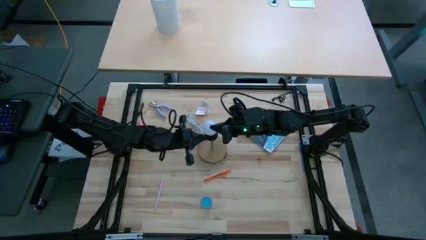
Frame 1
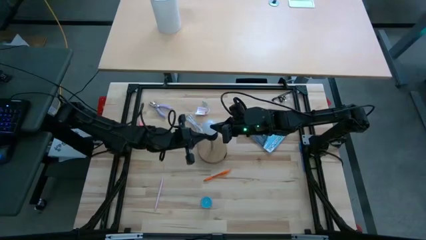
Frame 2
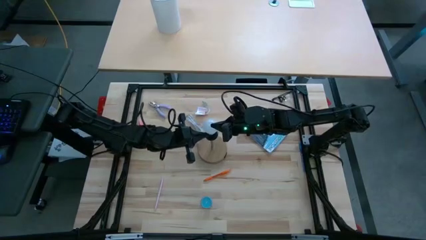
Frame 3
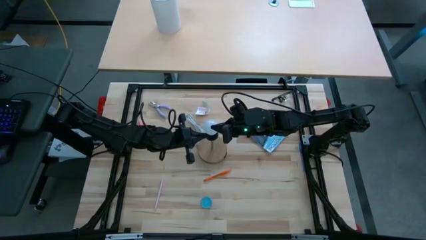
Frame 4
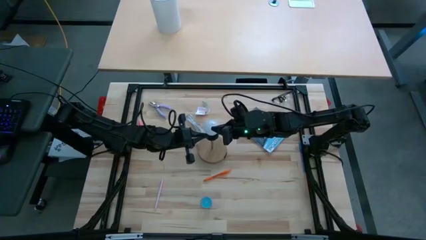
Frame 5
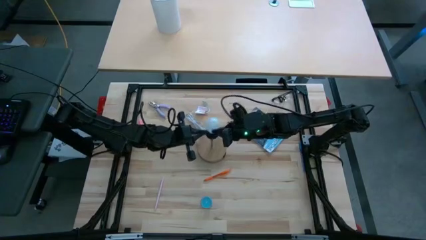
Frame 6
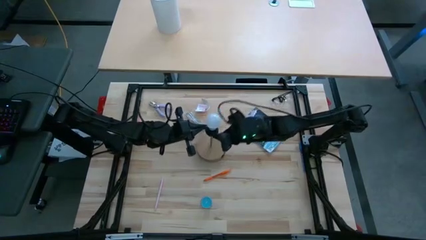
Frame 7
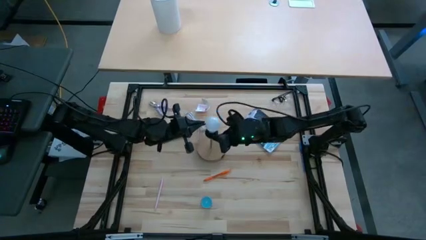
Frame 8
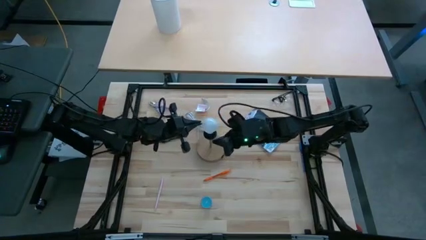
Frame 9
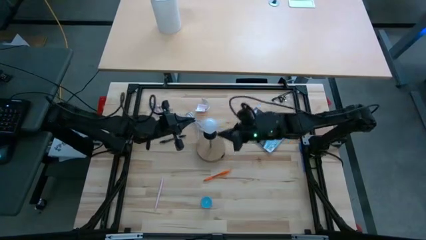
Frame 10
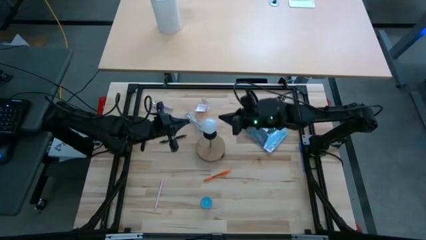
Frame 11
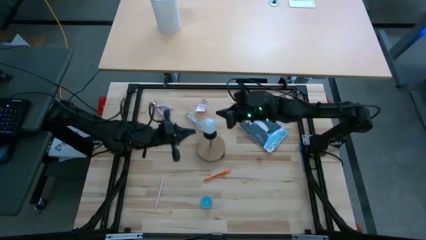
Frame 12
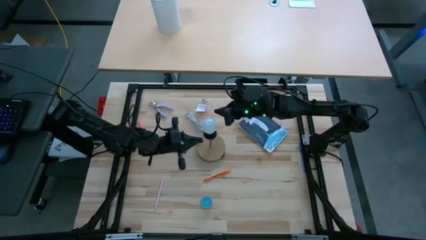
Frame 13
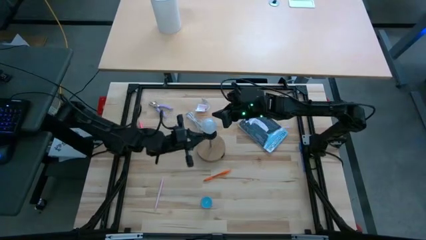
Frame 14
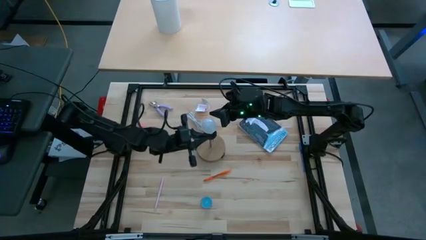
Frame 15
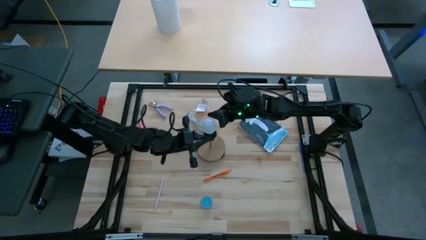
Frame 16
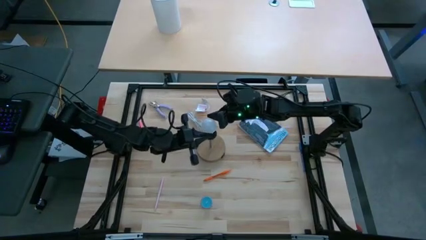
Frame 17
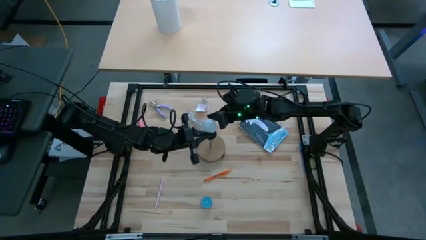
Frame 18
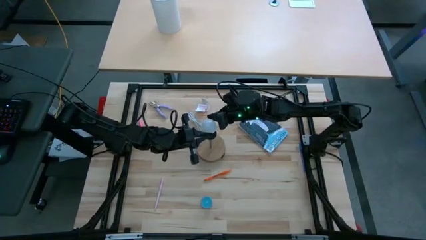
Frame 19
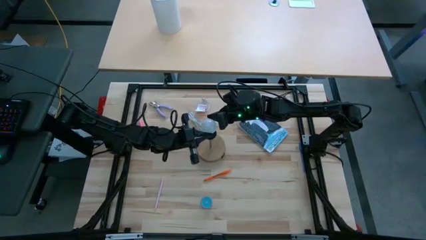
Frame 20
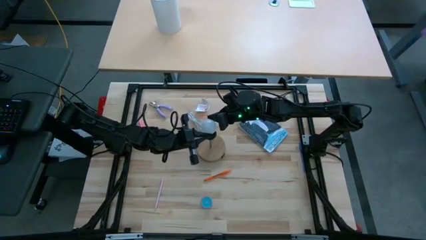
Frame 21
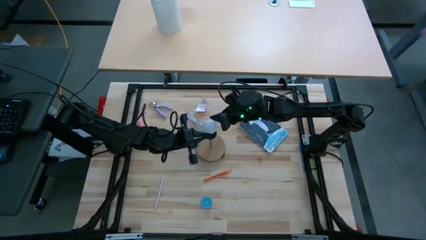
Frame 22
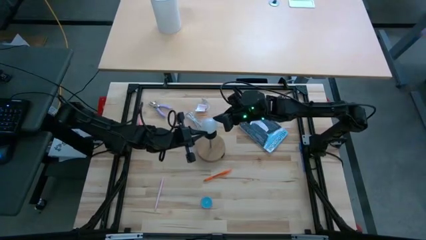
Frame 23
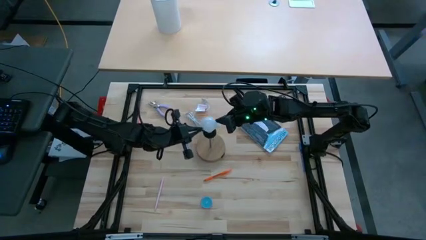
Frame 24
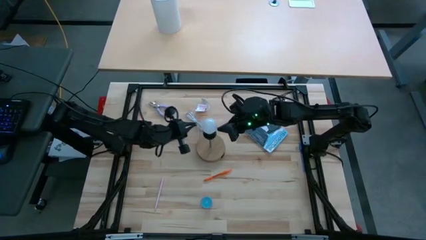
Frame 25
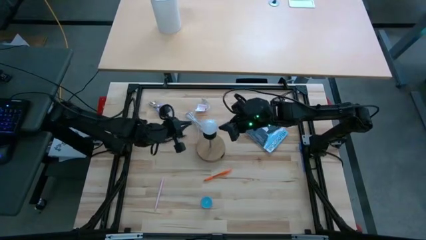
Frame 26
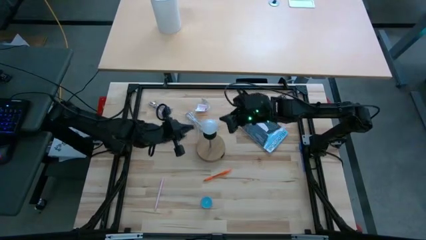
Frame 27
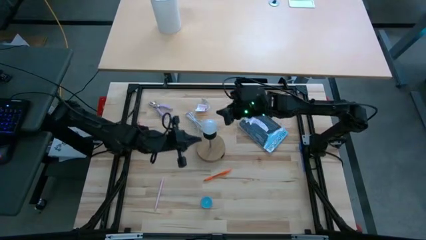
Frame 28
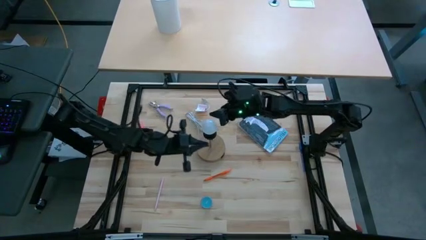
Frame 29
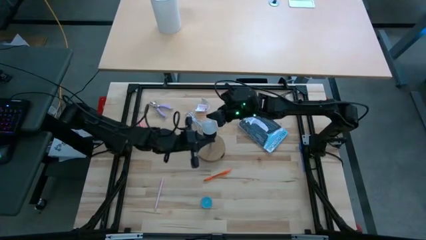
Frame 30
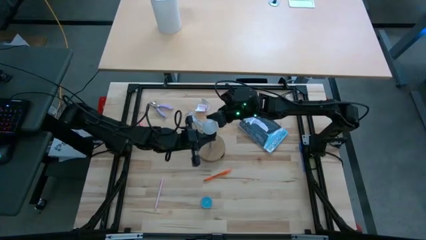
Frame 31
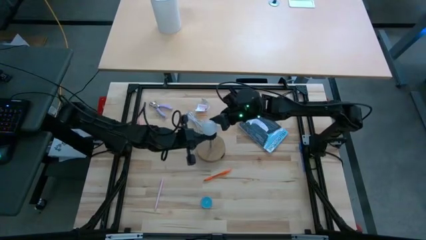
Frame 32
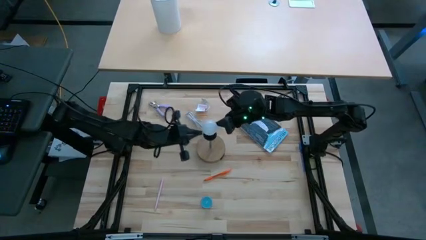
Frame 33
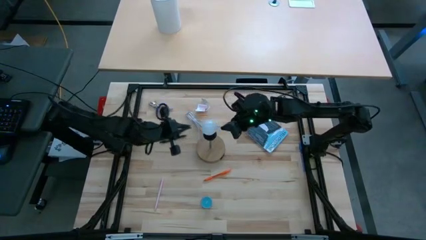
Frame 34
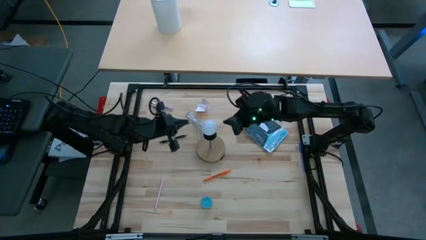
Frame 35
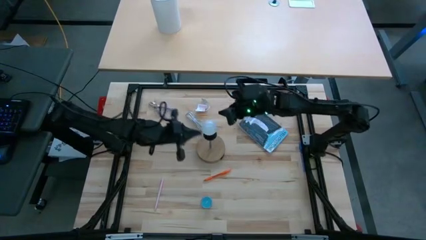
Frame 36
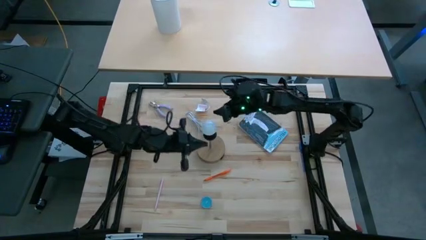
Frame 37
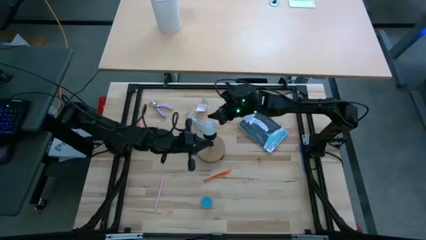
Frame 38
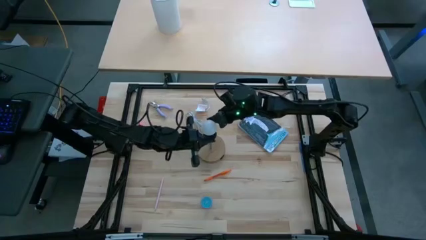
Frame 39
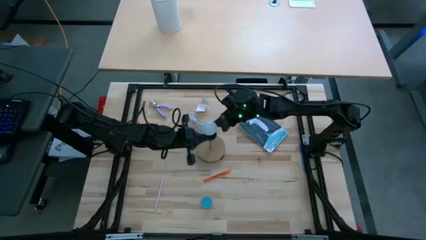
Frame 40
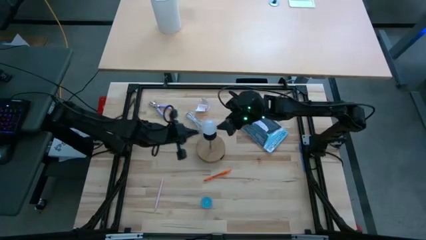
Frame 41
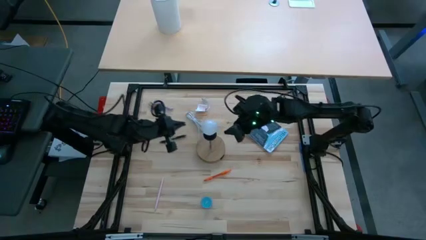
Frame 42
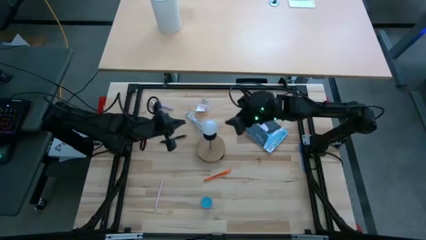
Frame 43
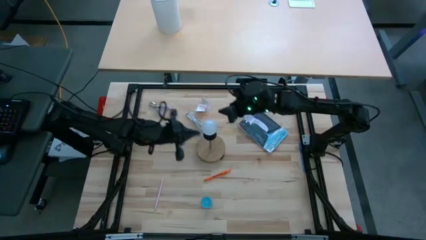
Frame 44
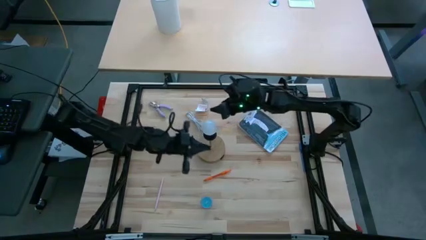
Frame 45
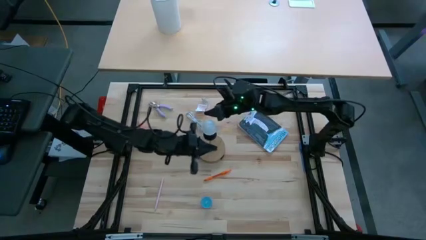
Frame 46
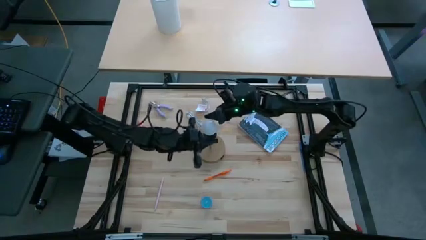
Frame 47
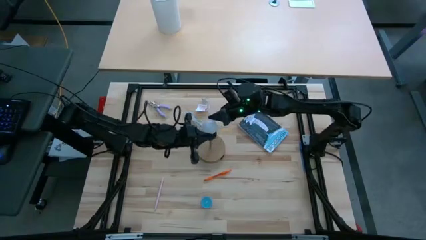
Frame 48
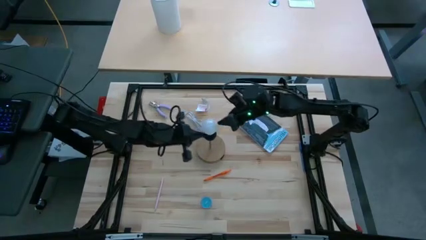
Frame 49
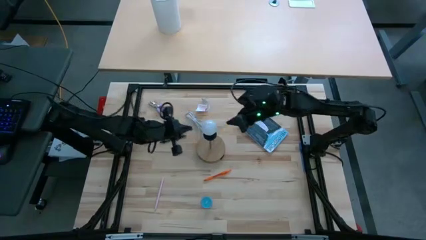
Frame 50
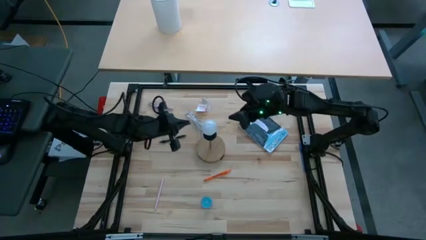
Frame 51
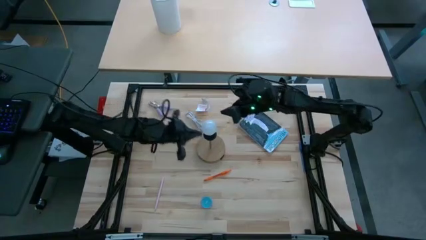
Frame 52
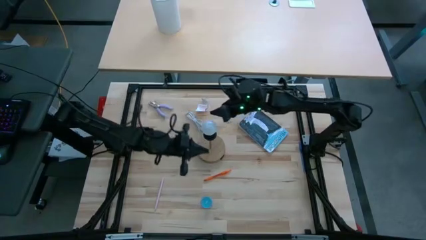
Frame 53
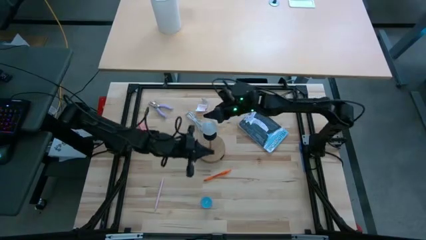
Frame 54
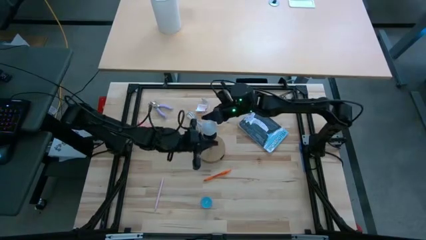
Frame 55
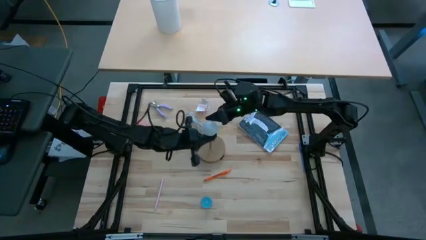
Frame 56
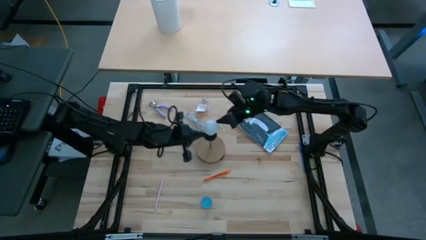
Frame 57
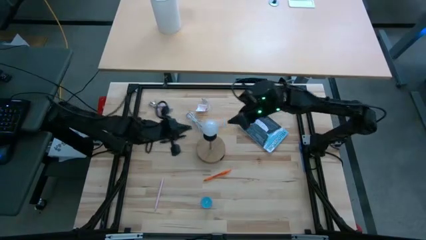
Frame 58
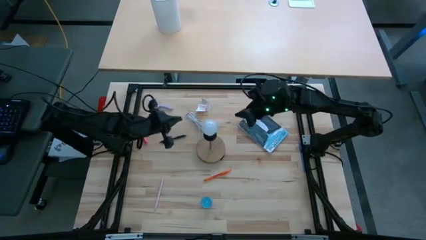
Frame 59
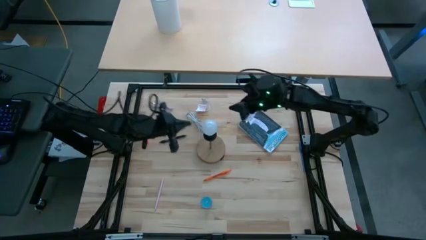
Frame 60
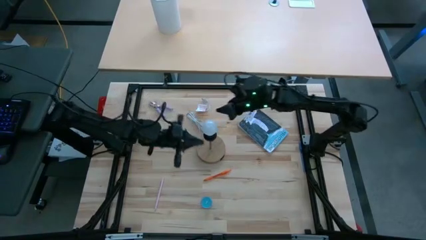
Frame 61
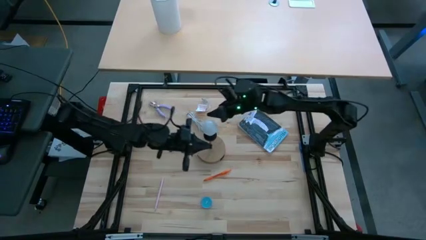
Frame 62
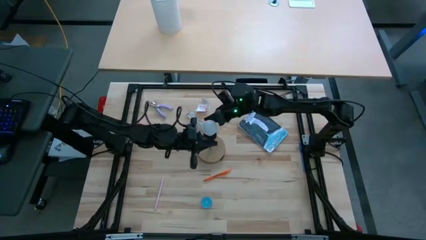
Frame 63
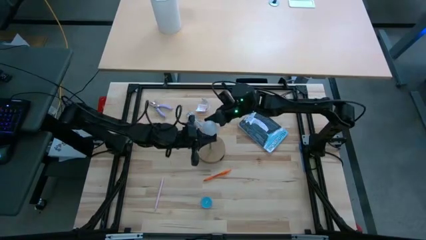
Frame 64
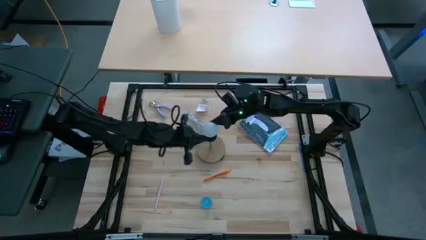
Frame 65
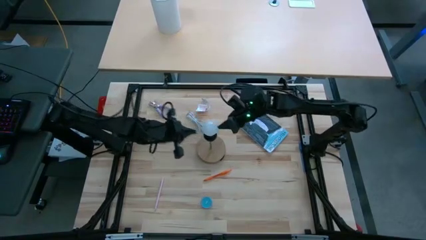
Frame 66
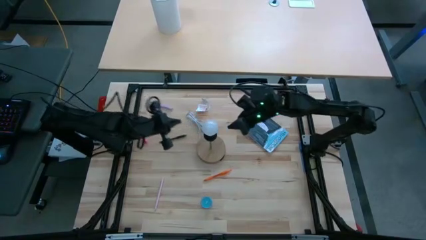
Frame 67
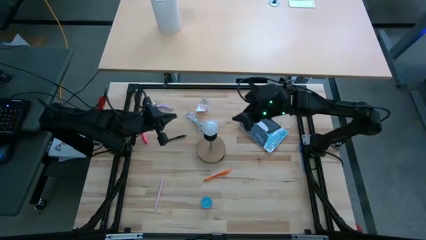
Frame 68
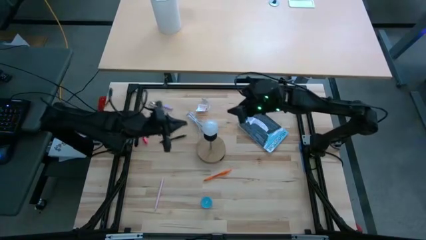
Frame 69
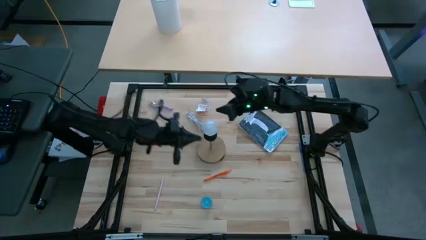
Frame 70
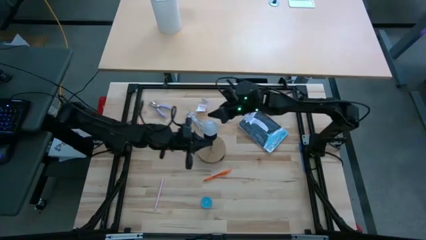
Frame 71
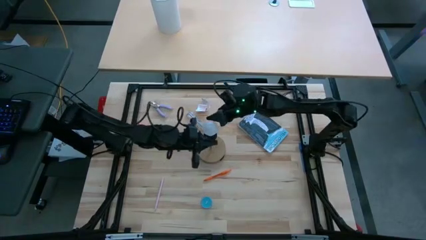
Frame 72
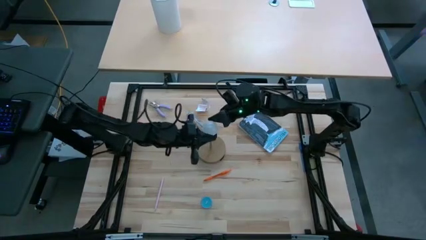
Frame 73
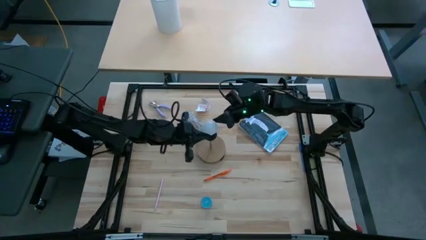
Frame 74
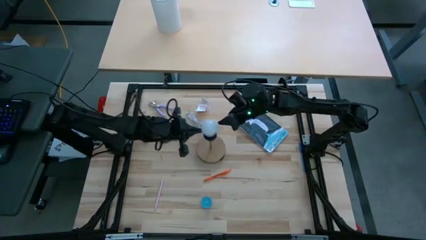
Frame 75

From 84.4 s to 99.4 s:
Task: Screw lightbulb
Insert the light bulb into the lamp

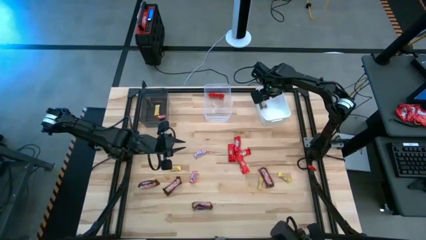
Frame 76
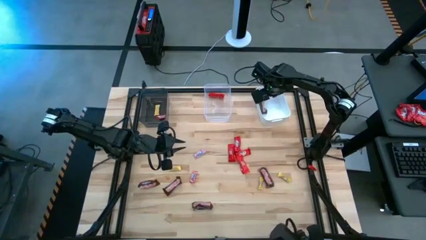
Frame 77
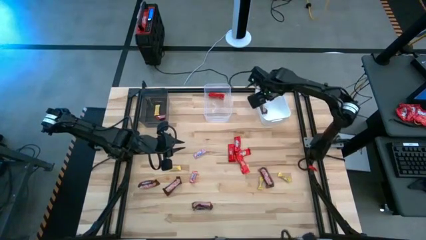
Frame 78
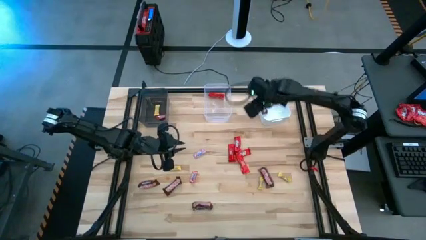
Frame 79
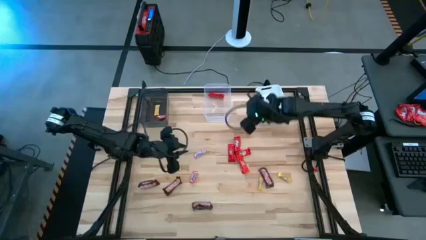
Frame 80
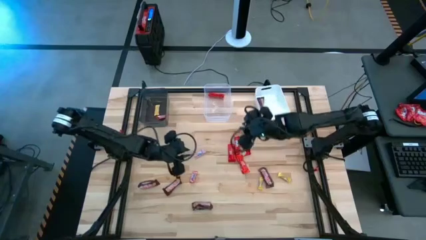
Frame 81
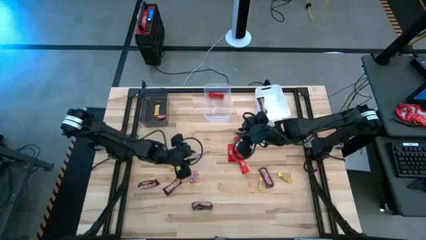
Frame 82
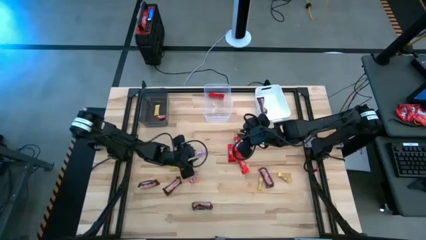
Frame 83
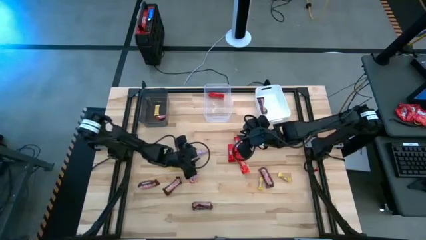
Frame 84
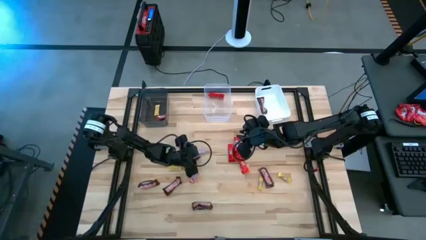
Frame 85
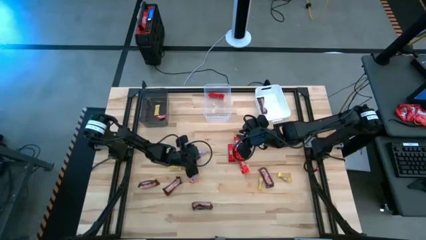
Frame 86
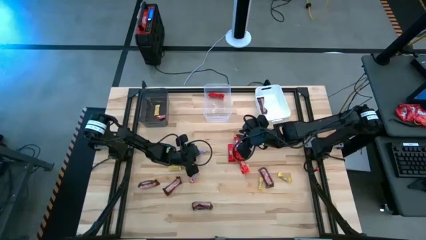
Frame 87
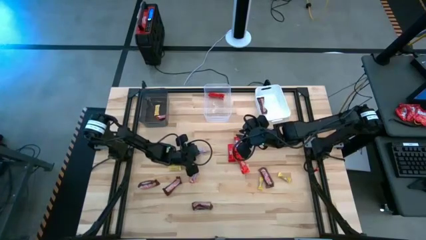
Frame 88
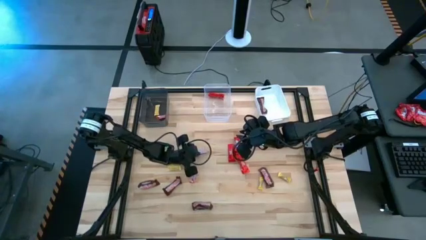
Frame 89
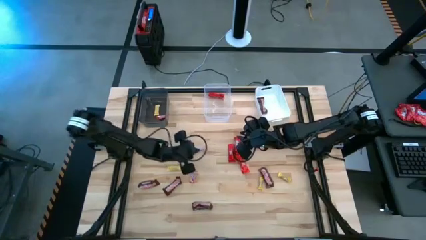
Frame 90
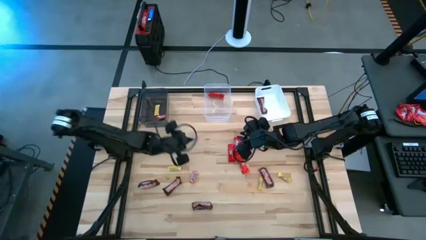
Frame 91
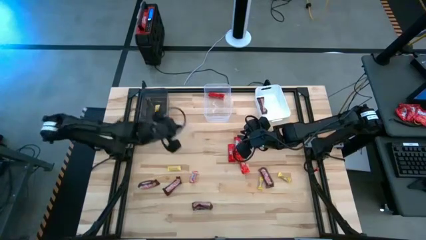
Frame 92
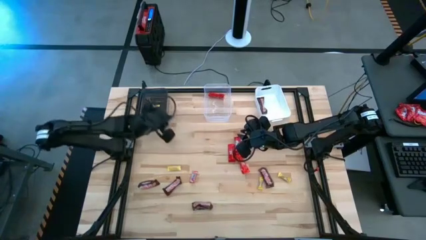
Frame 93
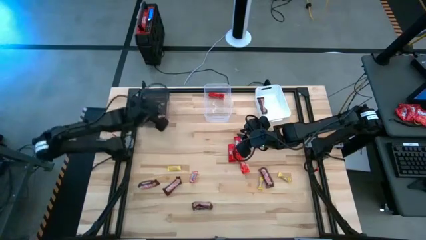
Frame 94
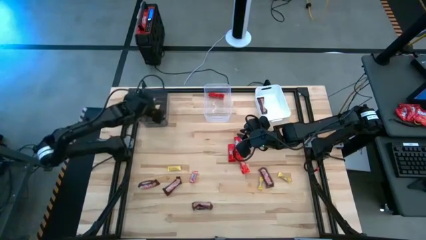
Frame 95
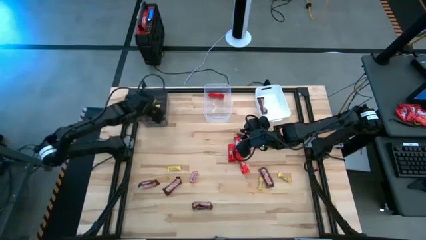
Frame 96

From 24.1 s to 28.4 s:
Task: Sort candy by brand, put in halloween buckets
Put the pink candy into the black bin
